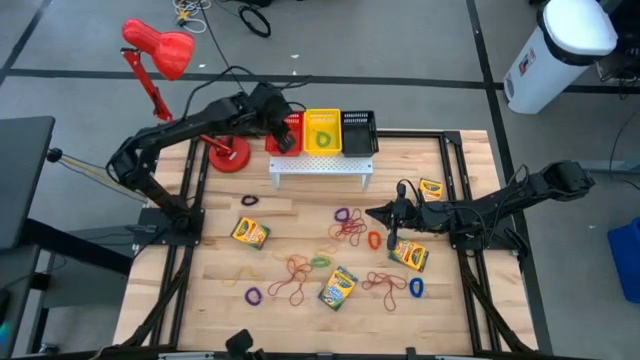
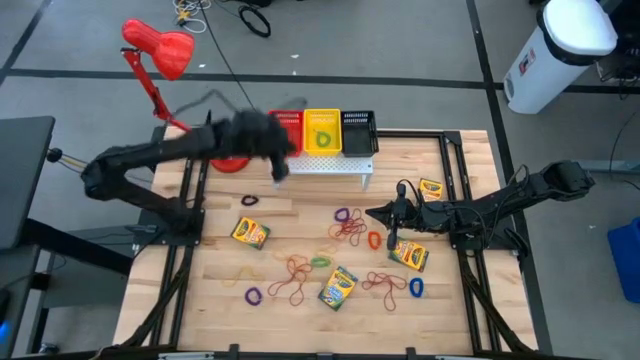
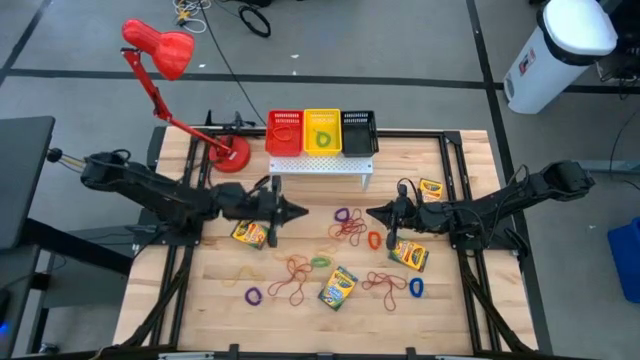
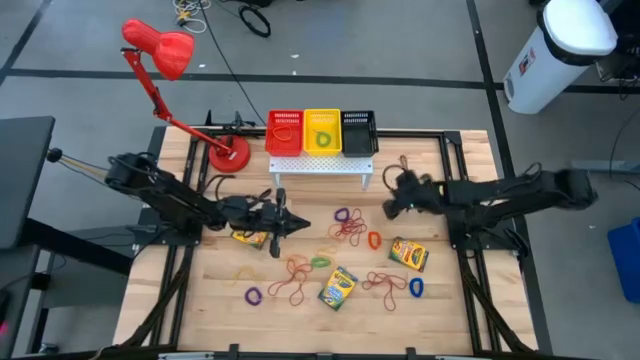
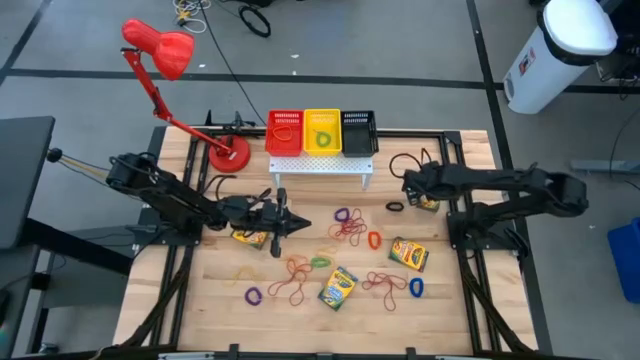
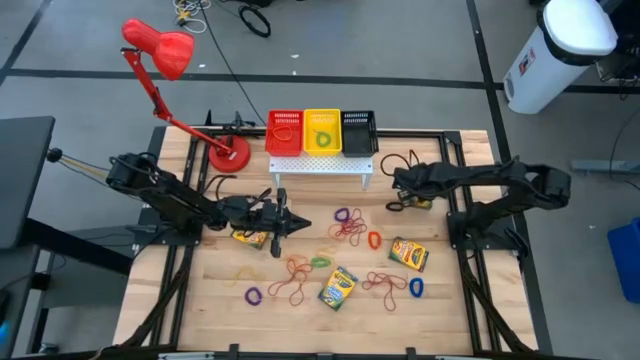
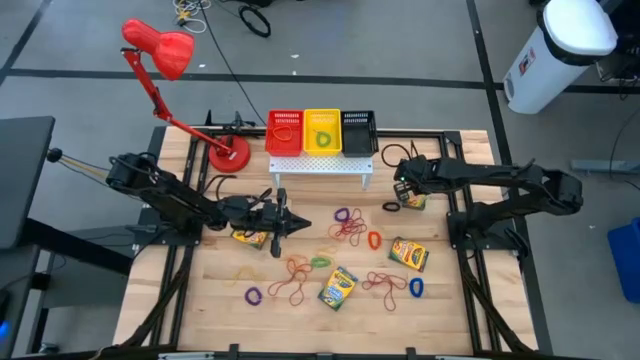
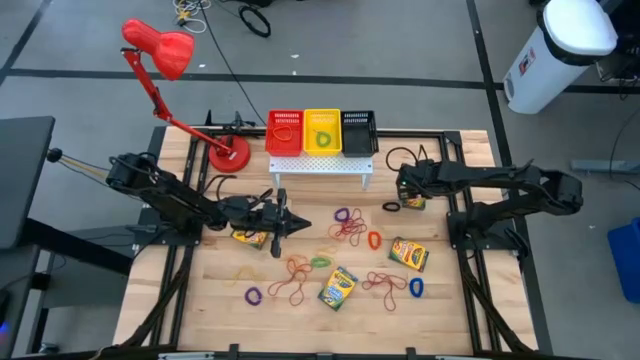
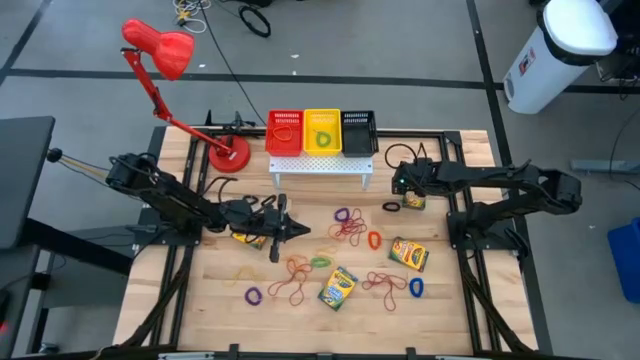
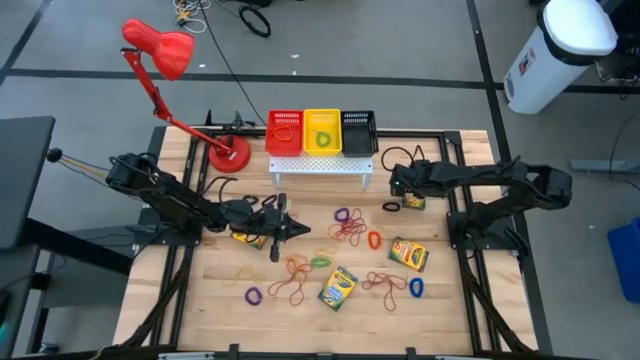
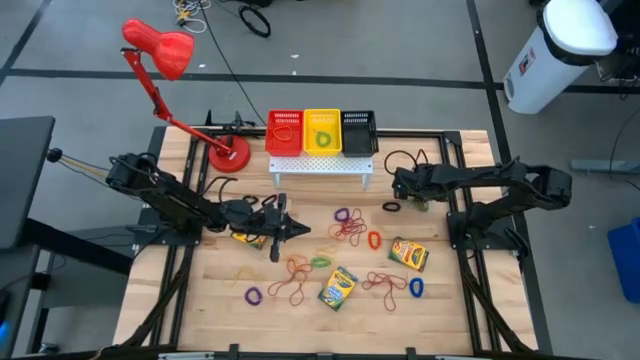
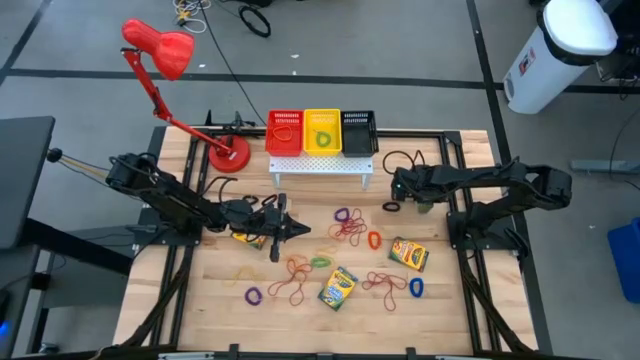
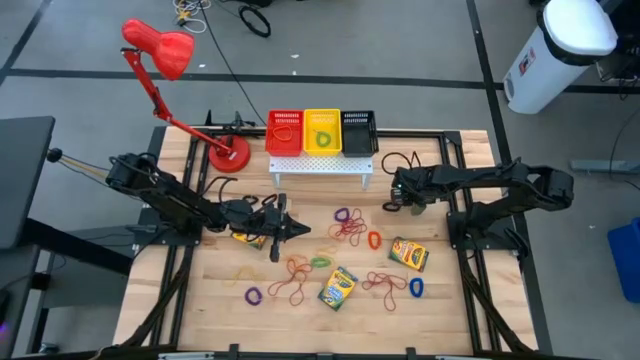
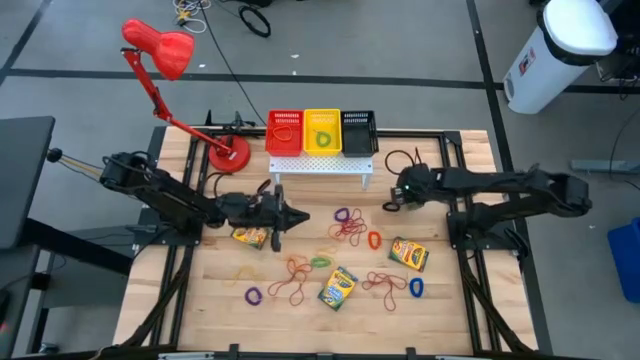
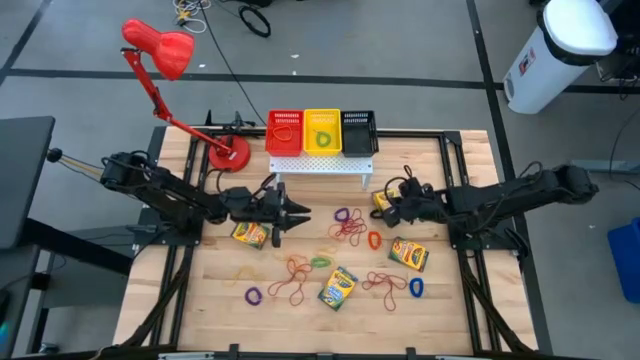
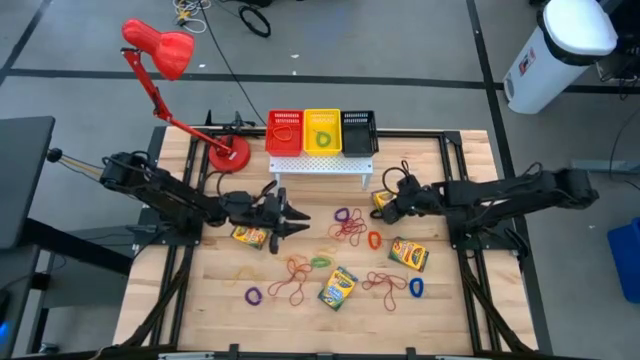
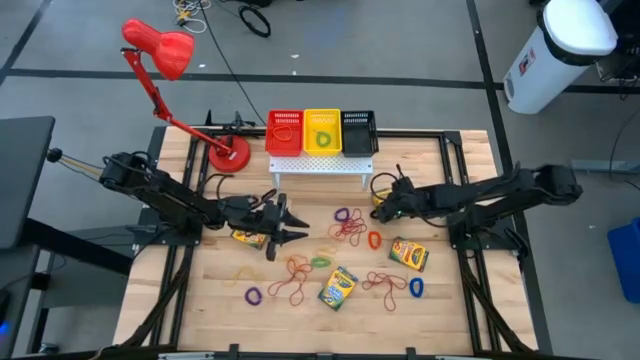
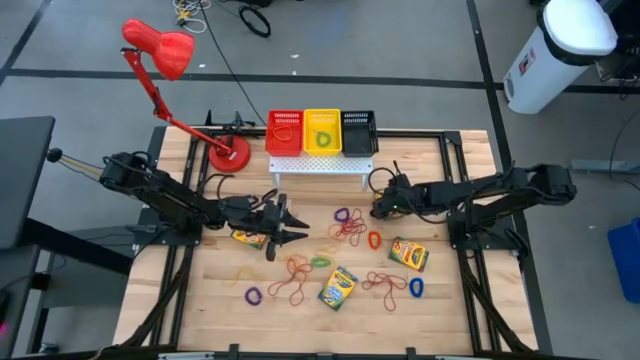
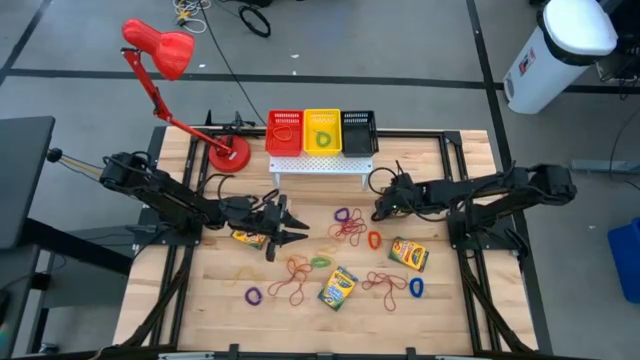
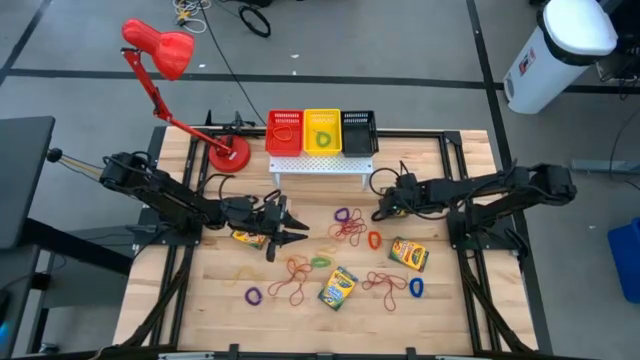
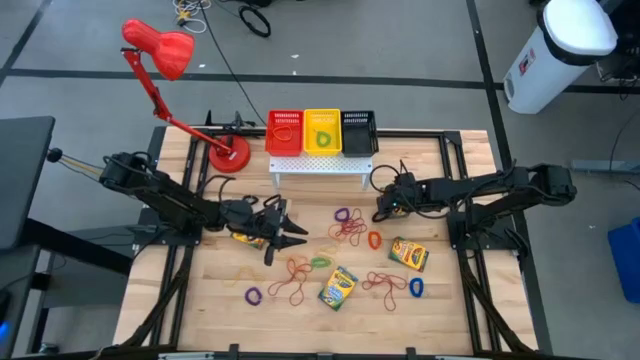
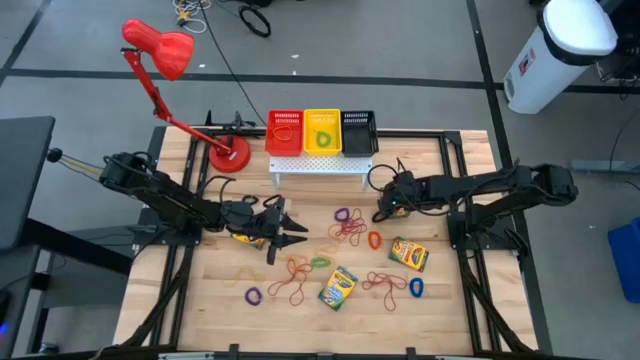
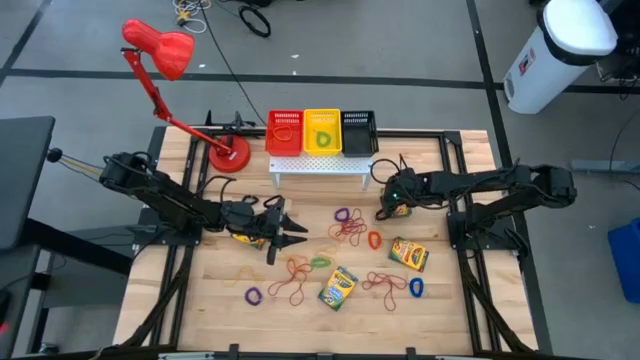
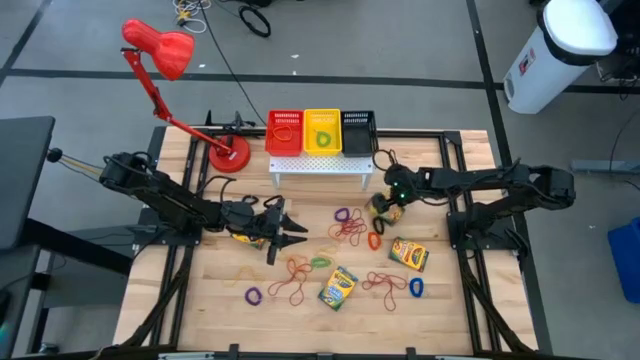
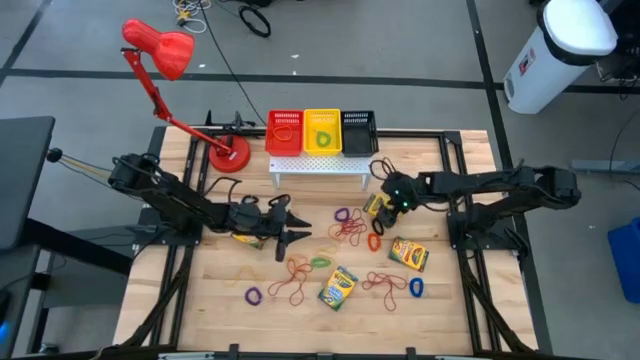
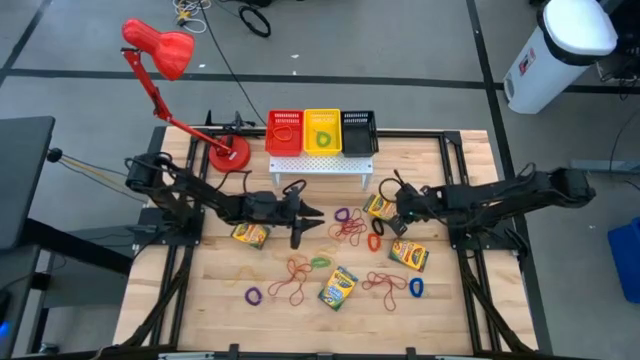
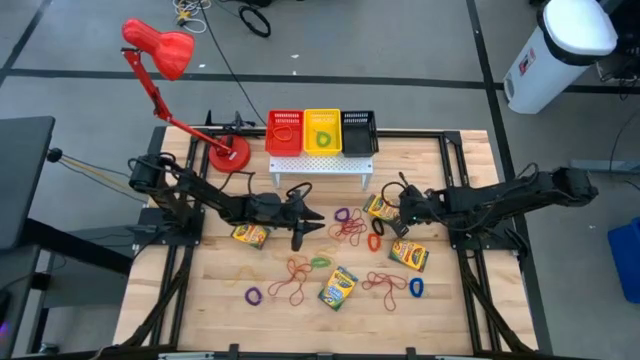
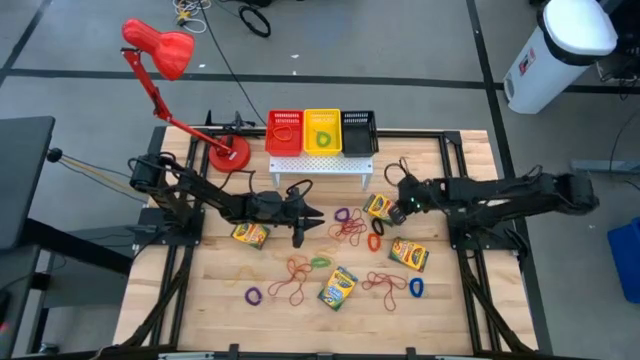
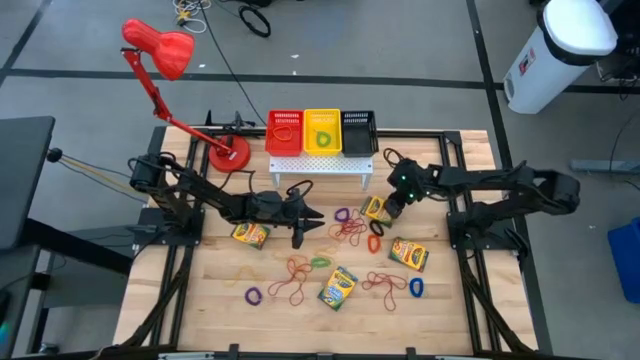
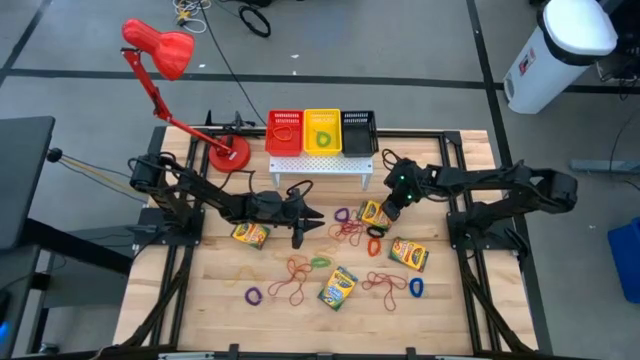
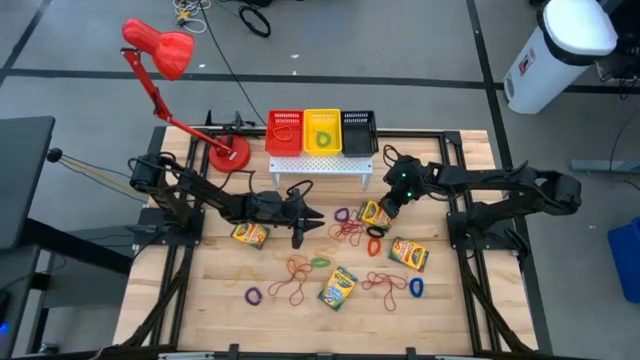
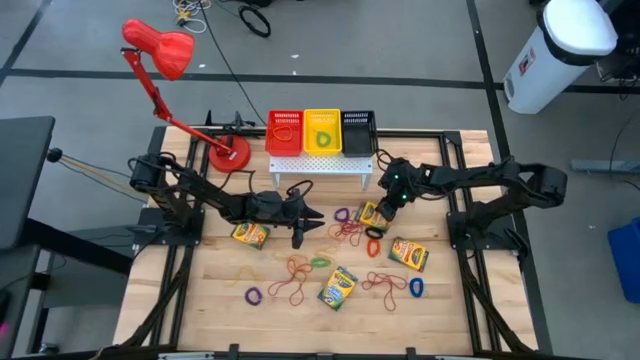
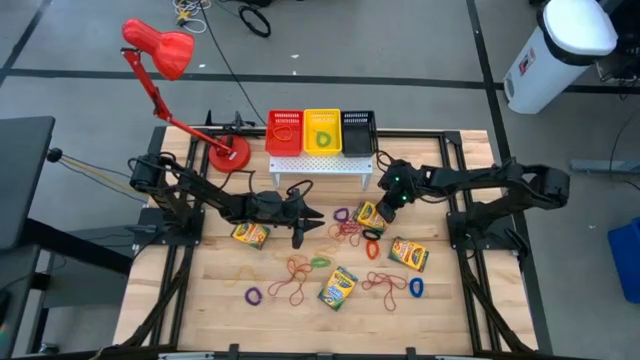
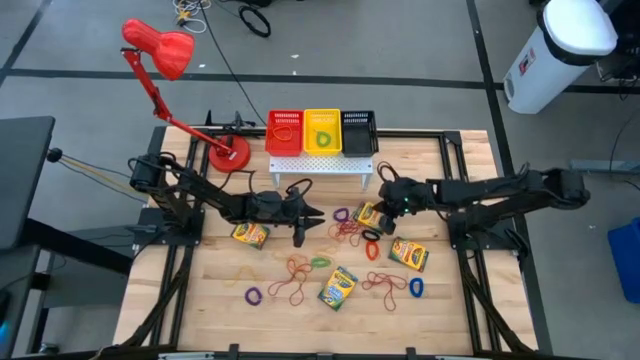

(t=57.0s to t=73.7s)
Task: Pick & Place Office Desk Supplies
Put the yellow crayon box into the black bin on the shelf

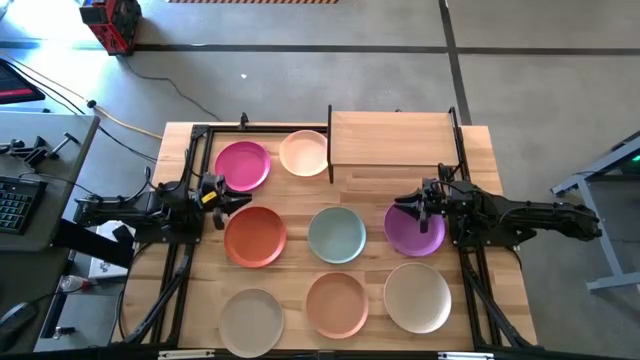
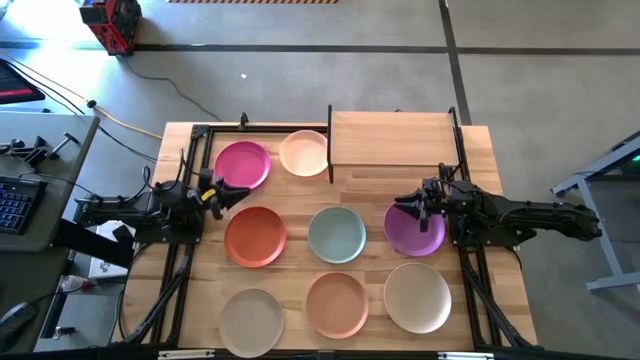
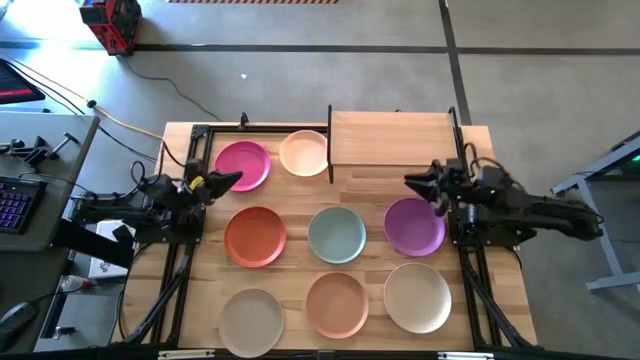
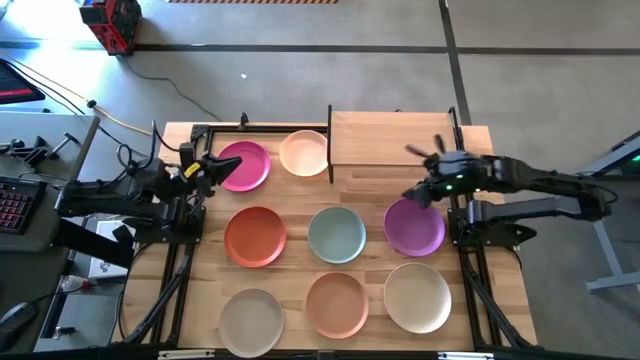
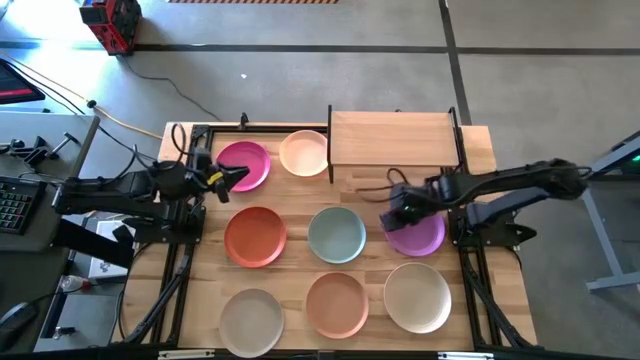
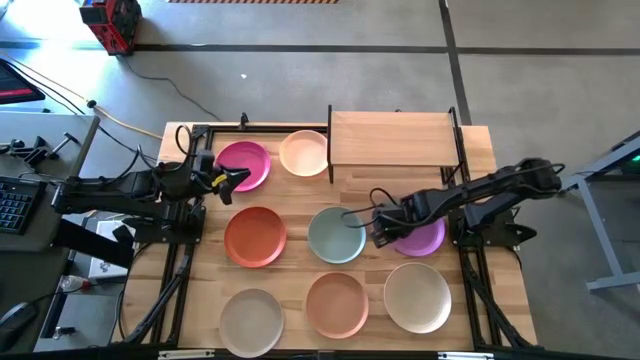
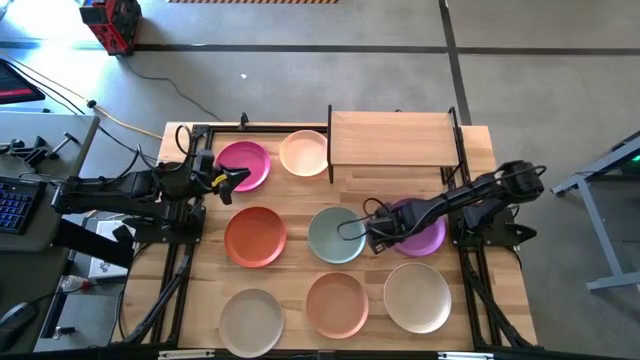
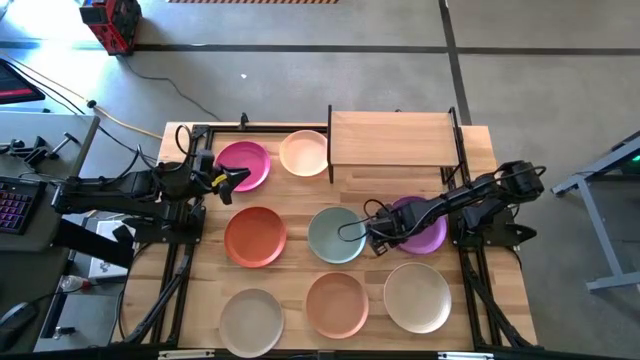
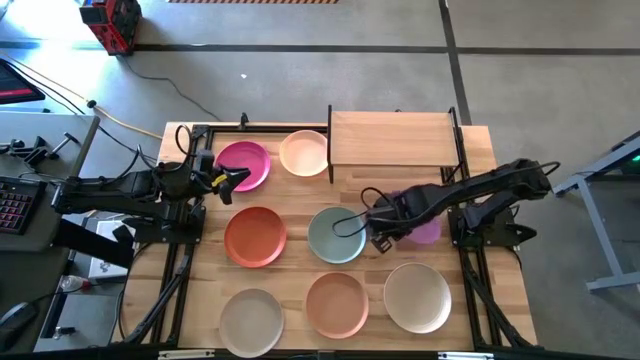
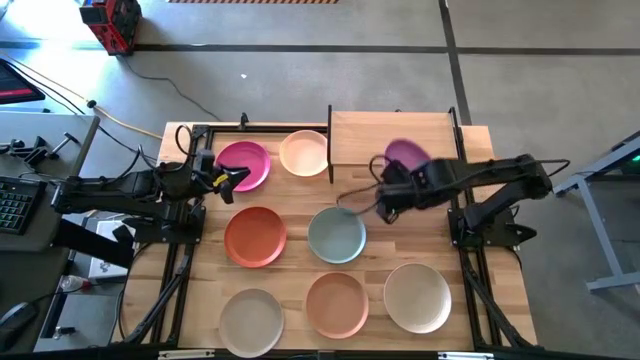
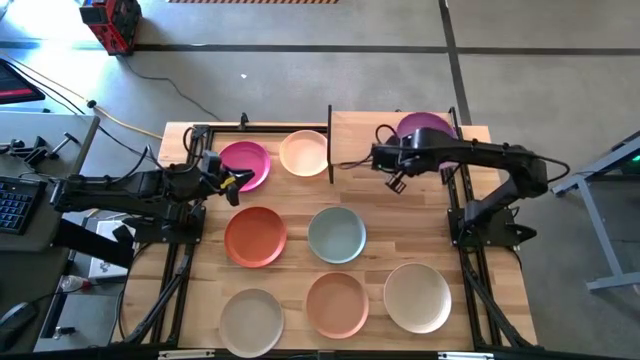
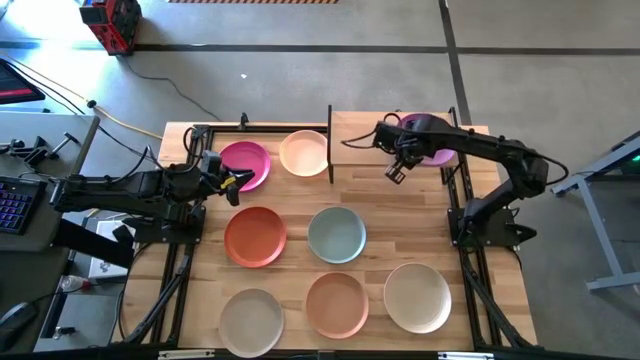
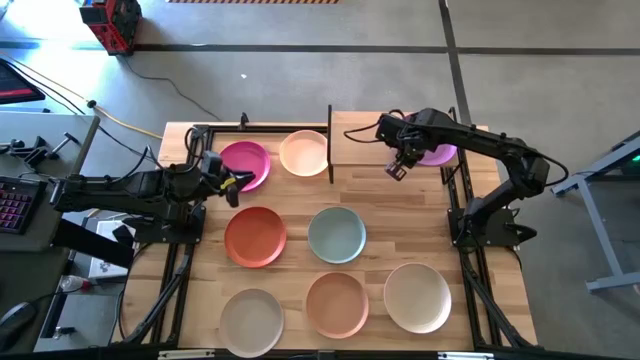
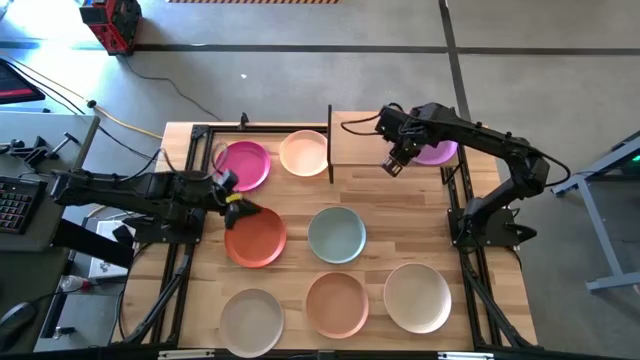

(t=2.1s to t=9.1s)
Task: Place and stack plates onto a shelf
Put the violet plate on the shelf
